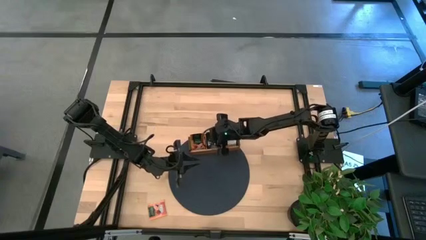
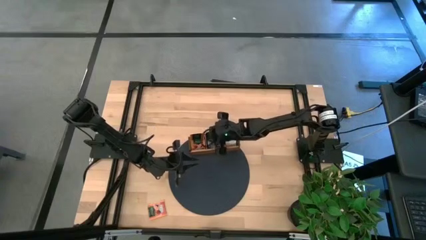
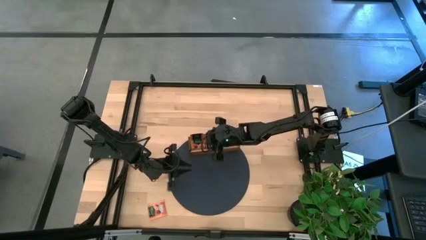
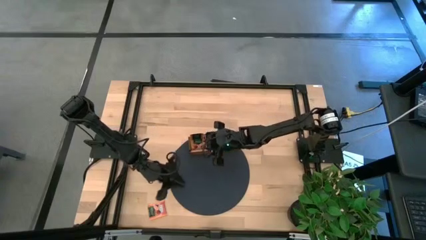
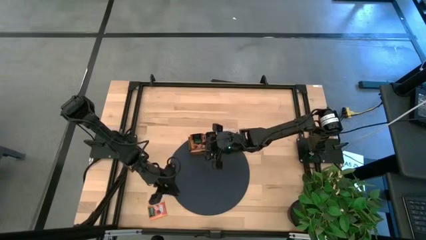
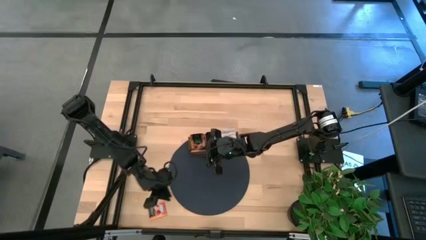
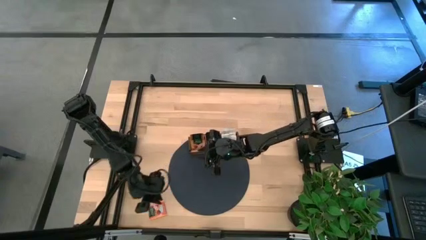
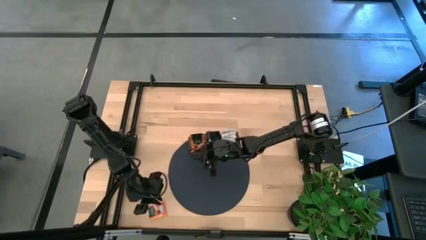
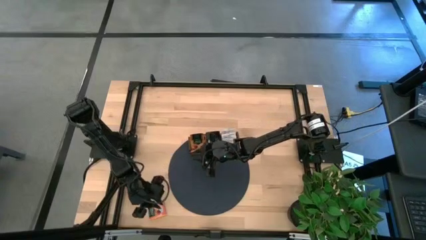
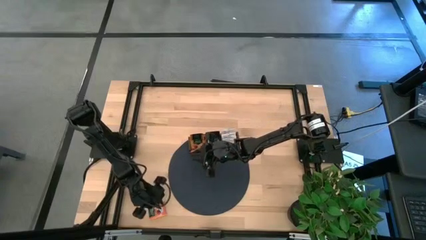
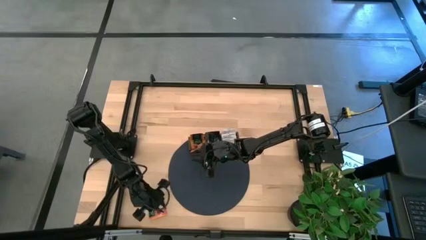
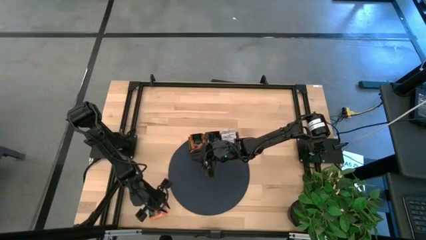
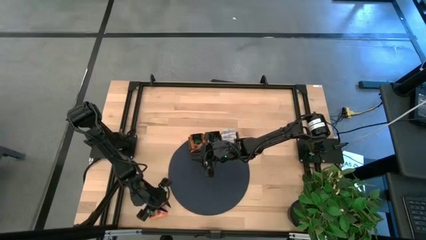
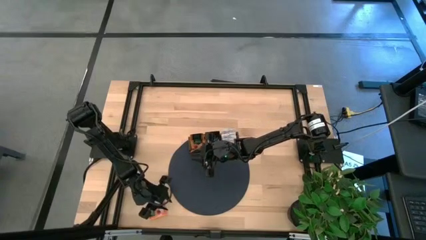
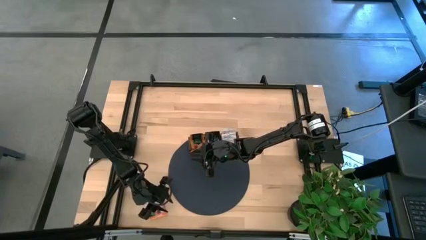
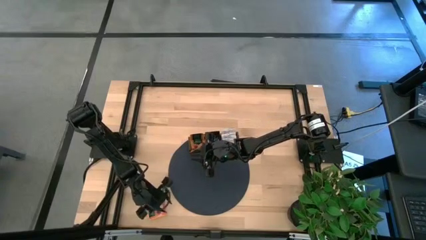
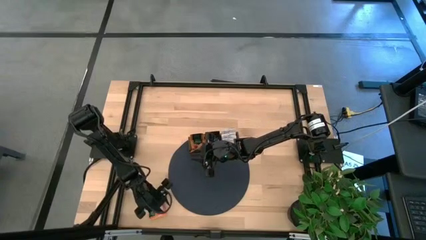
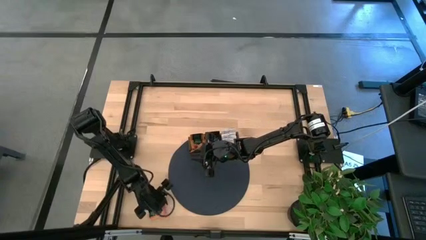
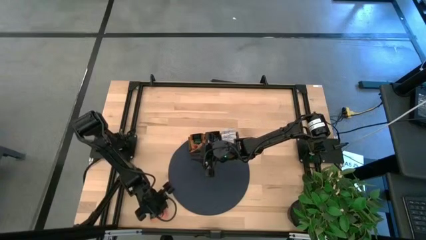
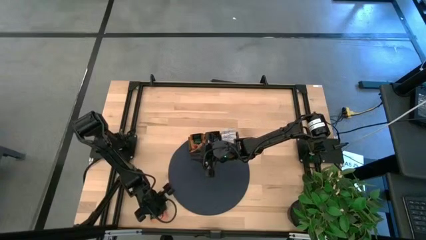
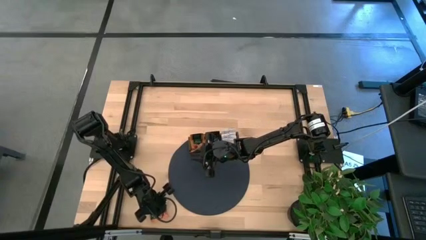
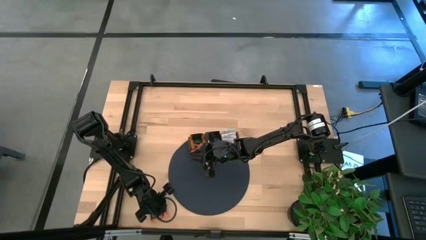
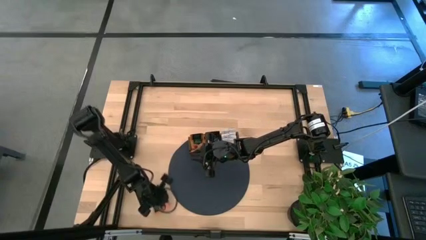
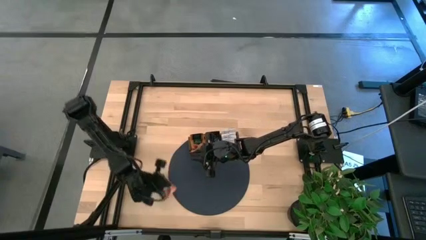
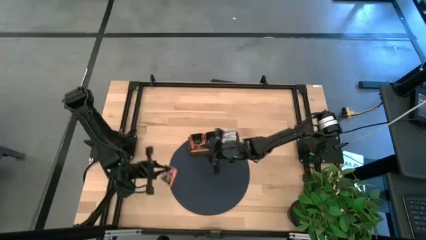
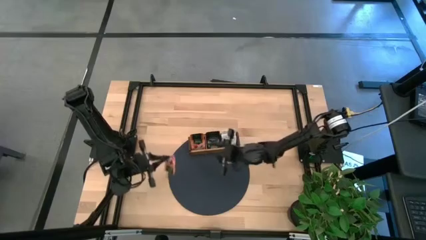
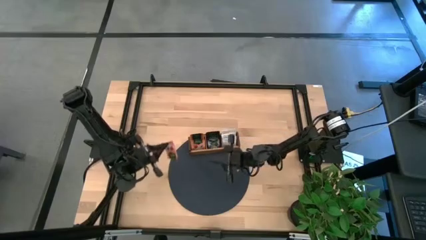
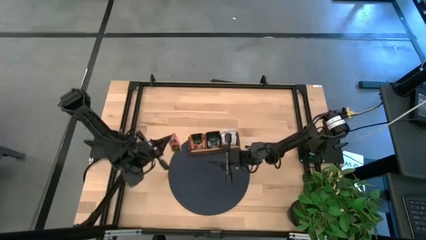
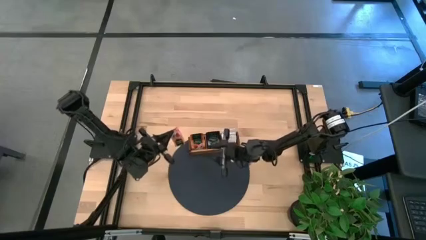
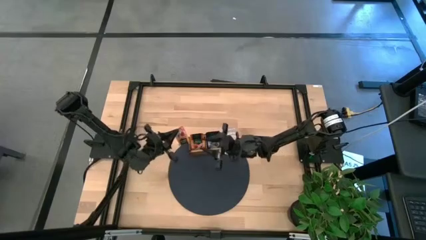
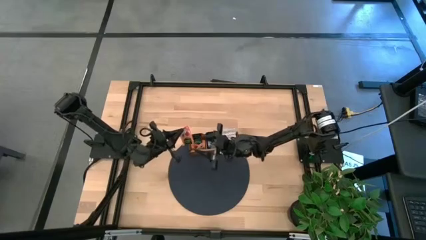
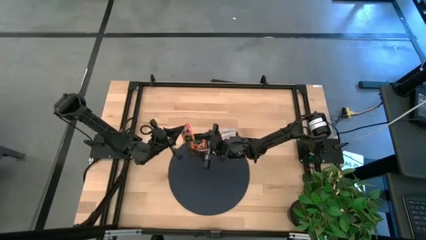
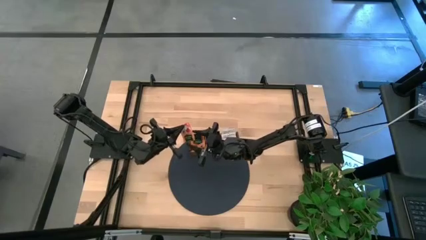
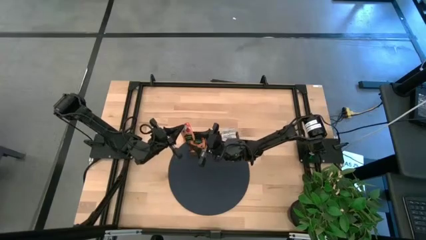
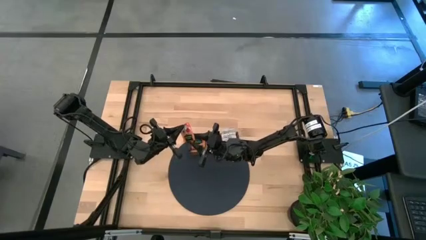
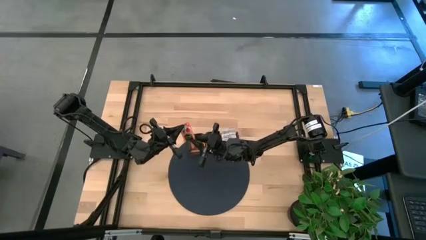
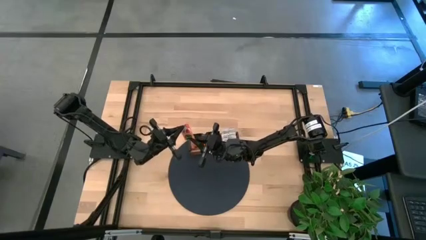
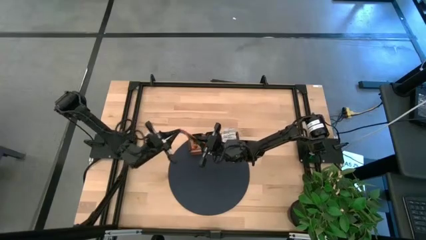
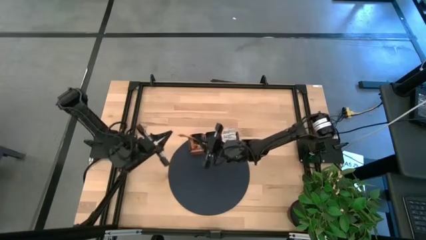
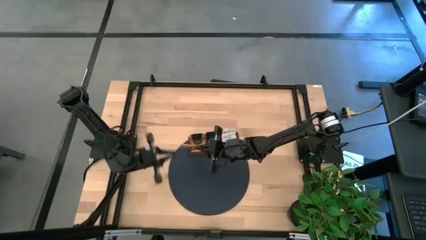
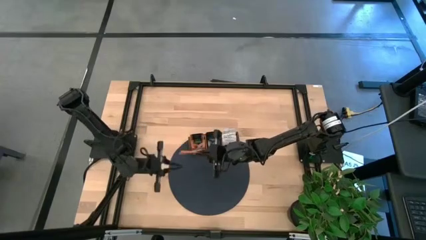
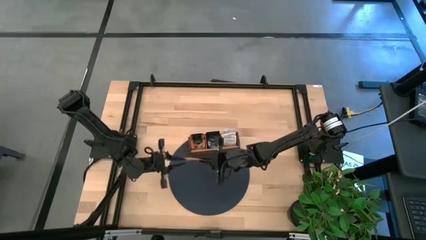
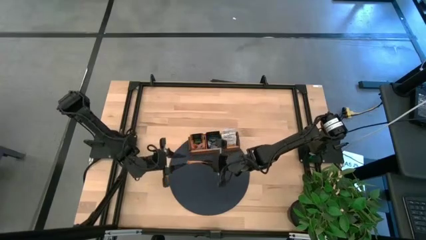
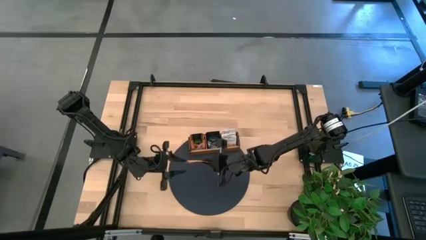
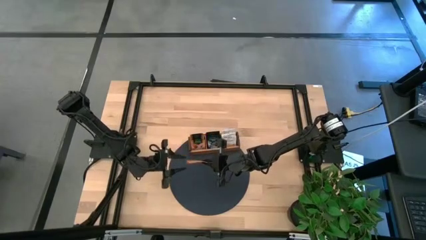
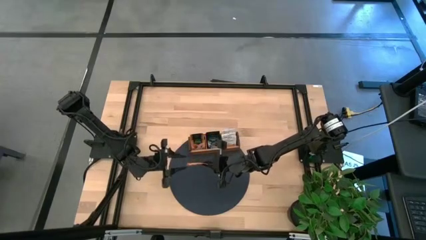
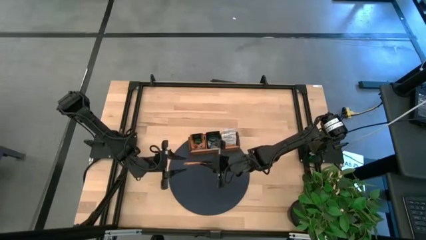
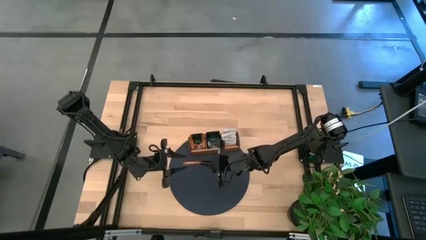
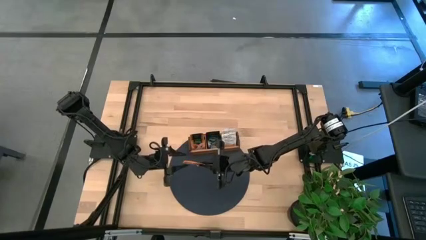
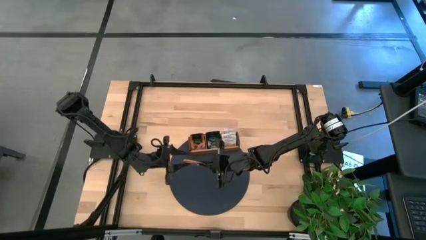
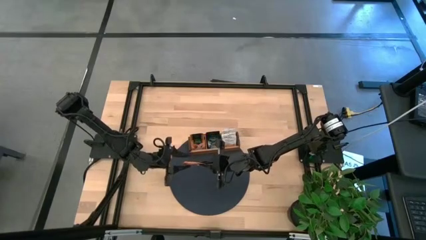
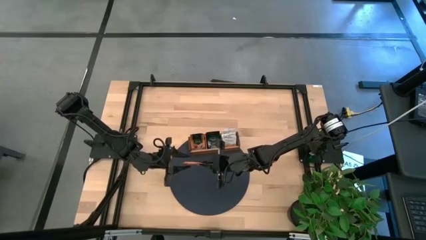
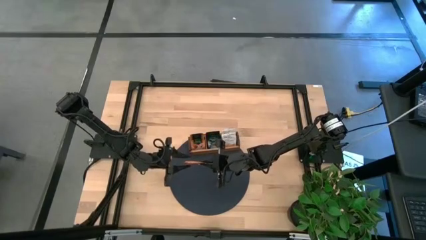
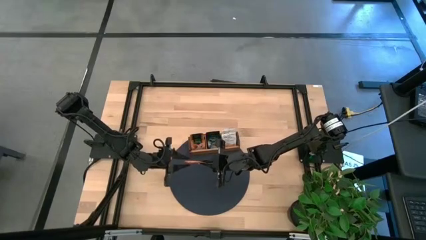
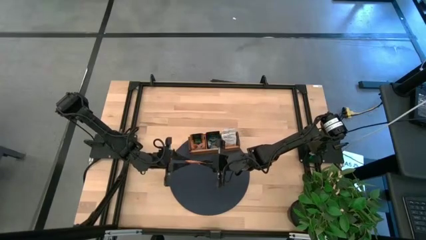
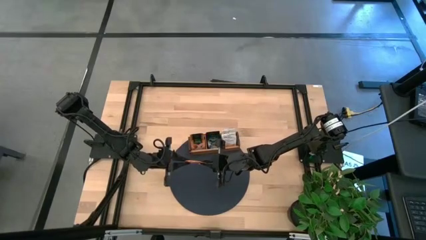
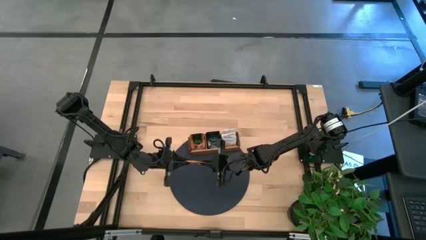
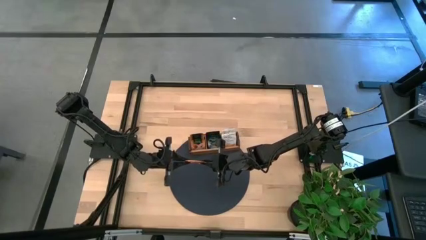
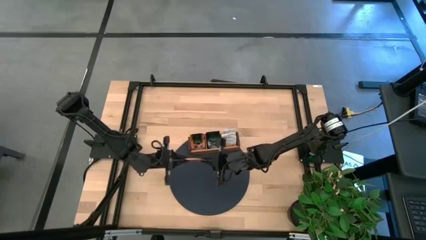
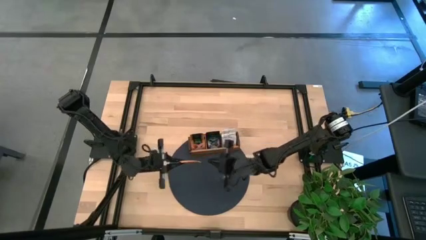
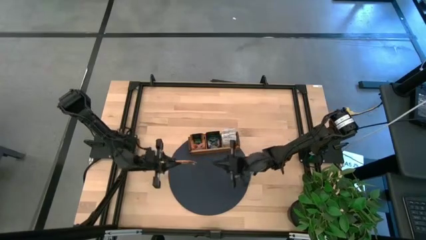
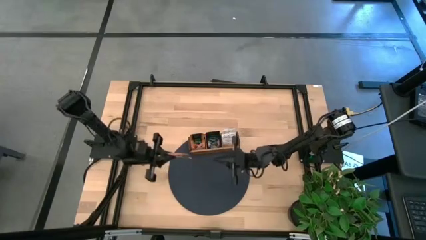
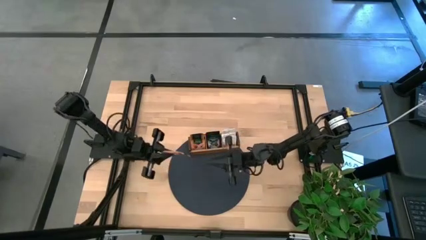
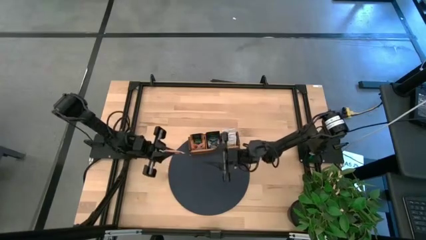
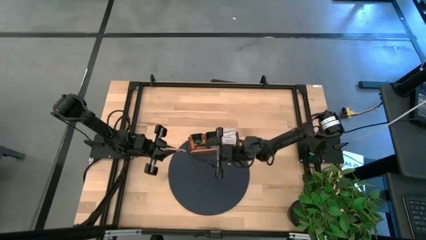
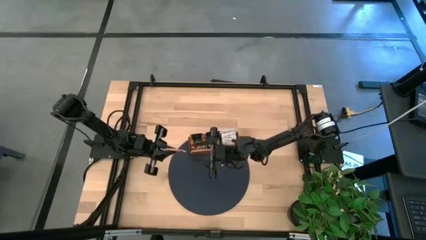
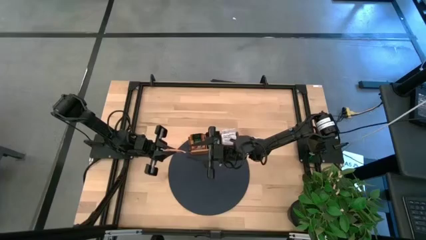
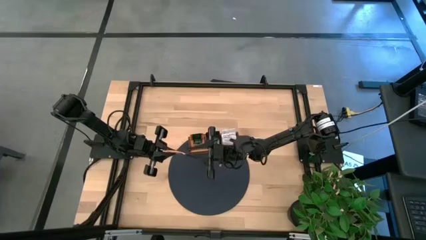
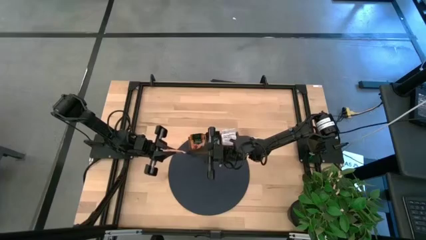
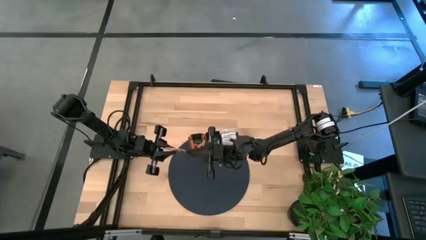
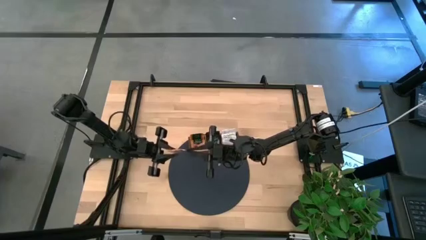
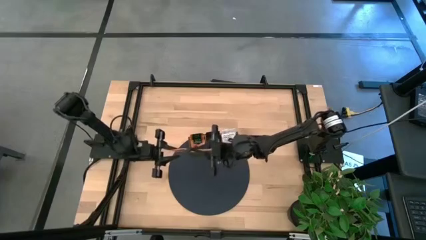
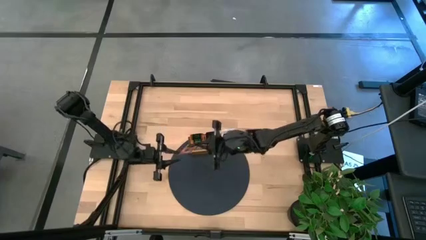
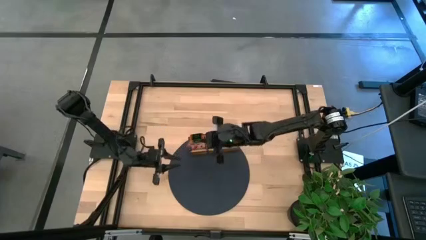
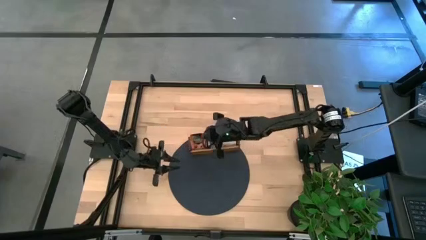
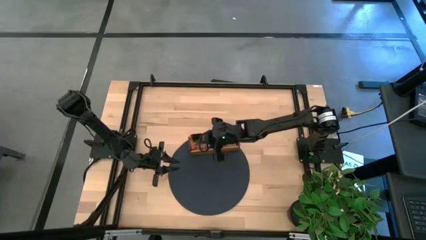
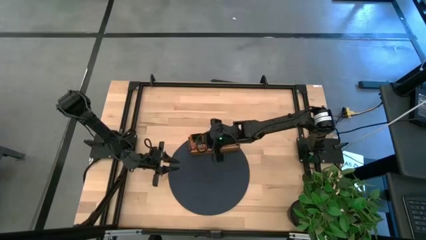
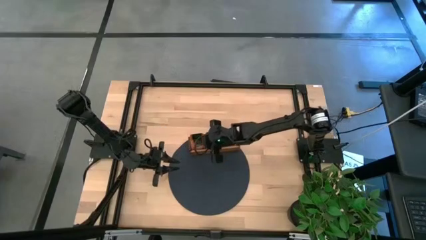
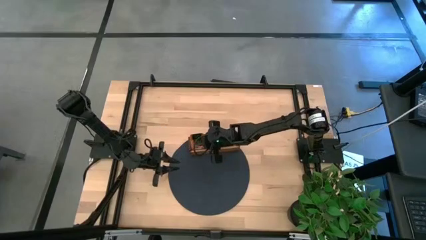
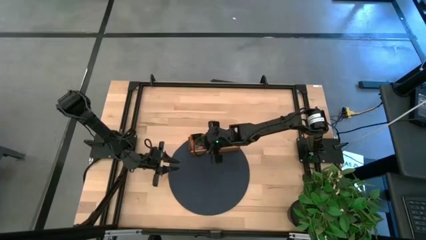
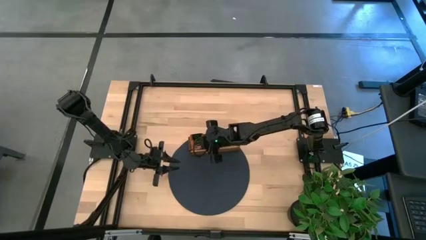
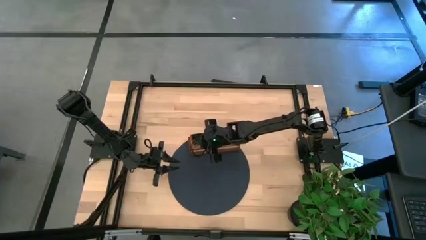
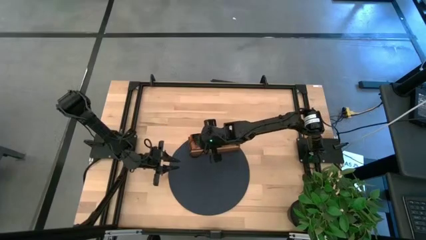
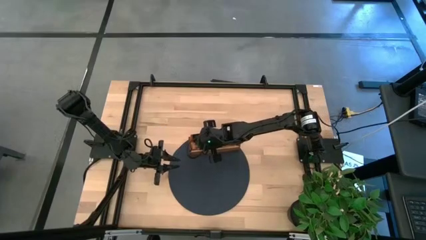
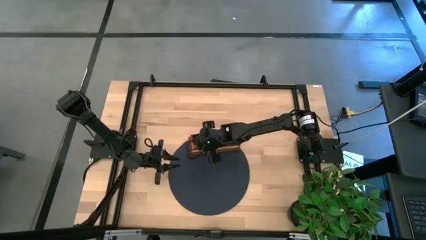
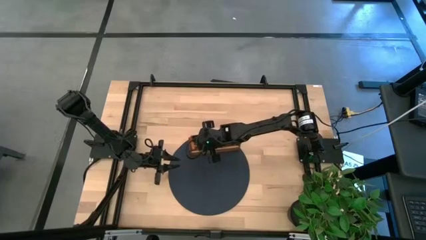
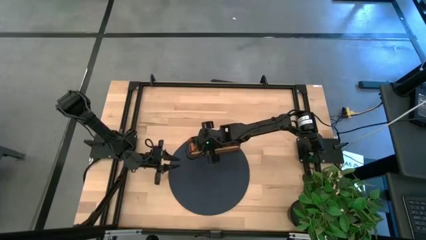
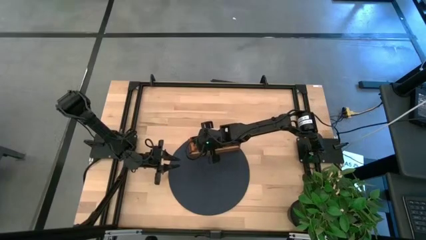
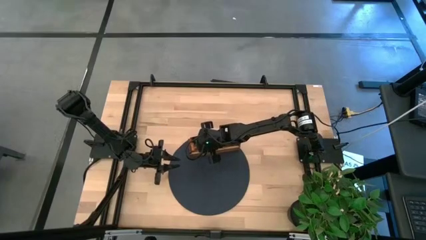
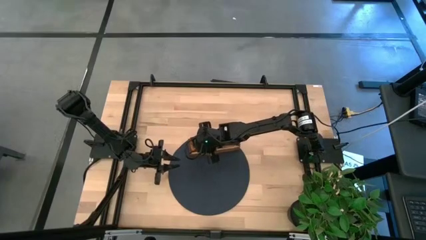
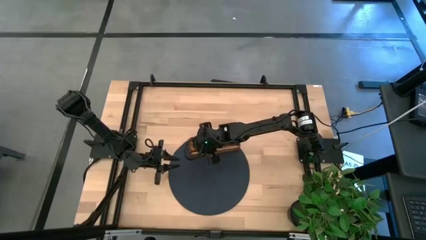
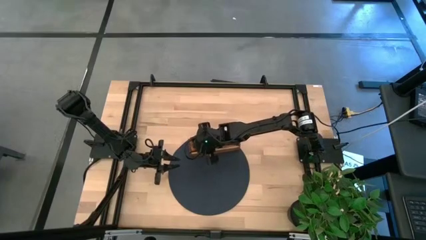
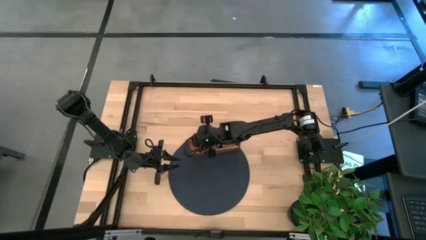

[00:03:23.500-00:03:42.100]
Task: Pick & Place Tea
Put the orange tea bag into the left section of the wooden organizer
